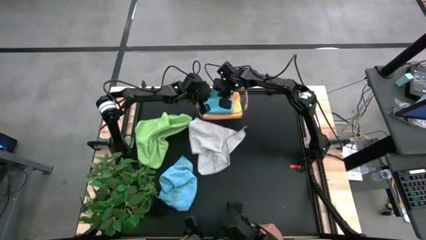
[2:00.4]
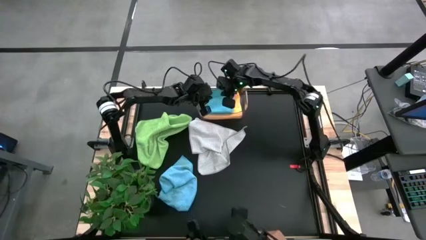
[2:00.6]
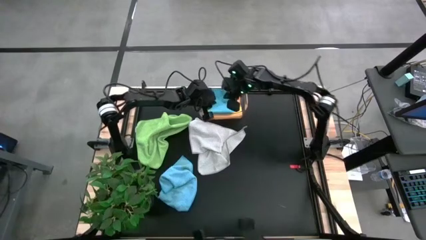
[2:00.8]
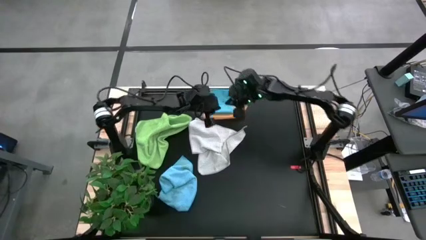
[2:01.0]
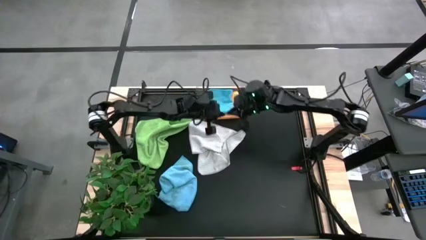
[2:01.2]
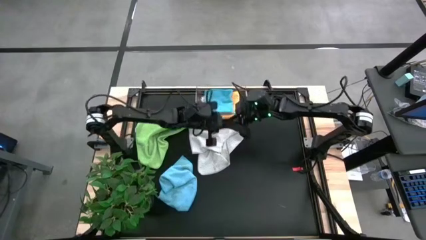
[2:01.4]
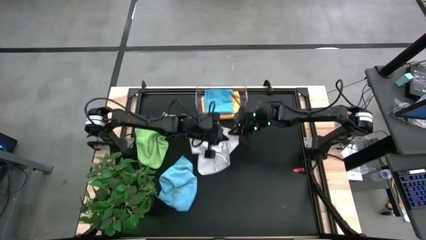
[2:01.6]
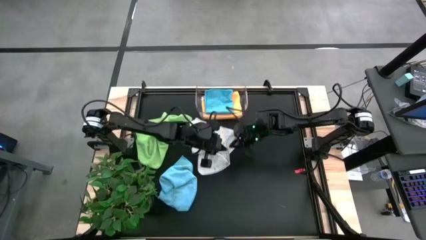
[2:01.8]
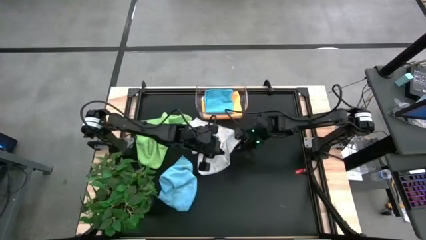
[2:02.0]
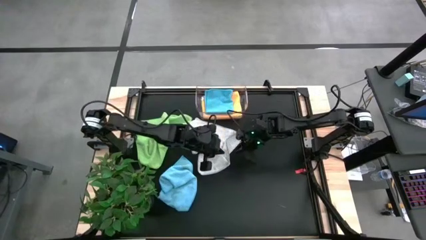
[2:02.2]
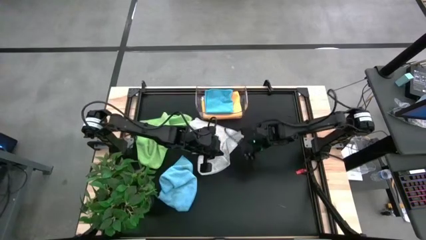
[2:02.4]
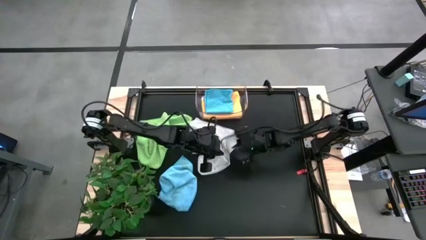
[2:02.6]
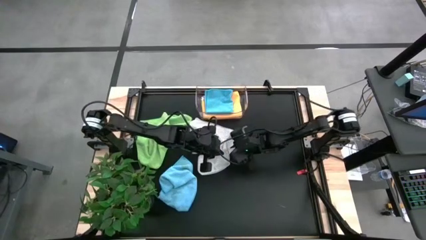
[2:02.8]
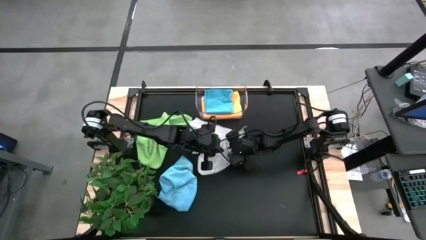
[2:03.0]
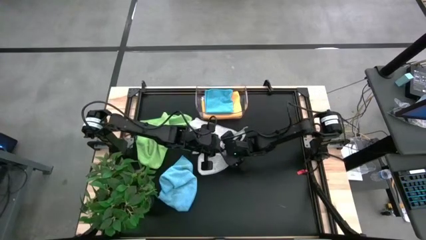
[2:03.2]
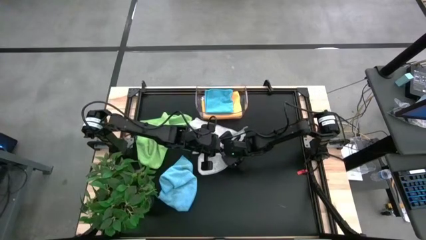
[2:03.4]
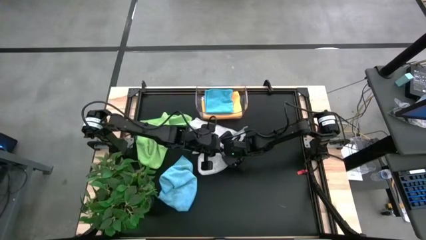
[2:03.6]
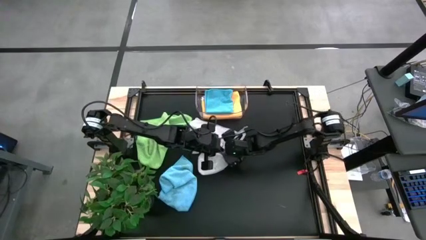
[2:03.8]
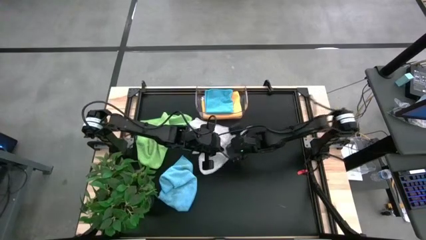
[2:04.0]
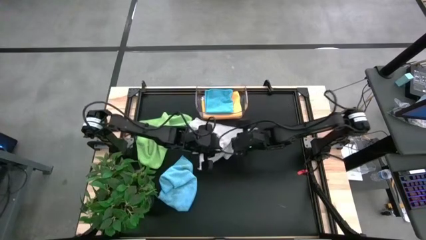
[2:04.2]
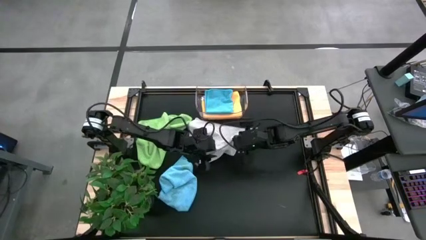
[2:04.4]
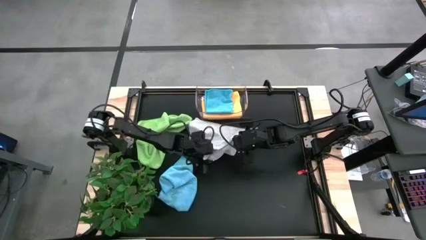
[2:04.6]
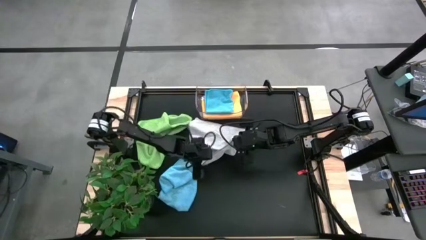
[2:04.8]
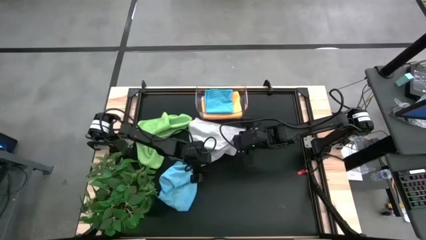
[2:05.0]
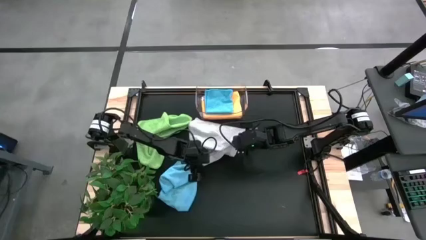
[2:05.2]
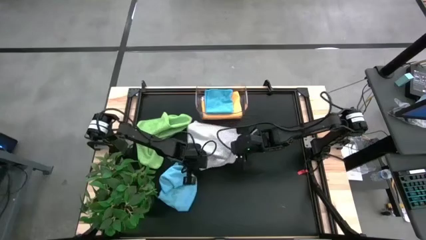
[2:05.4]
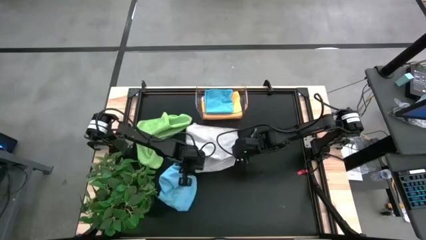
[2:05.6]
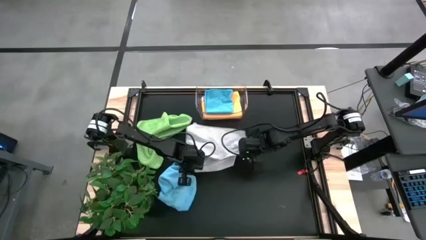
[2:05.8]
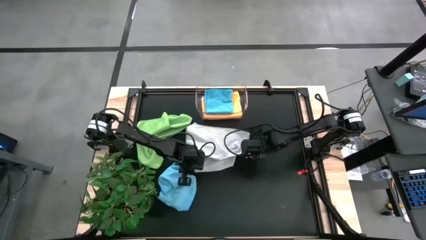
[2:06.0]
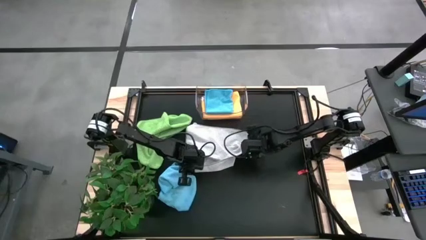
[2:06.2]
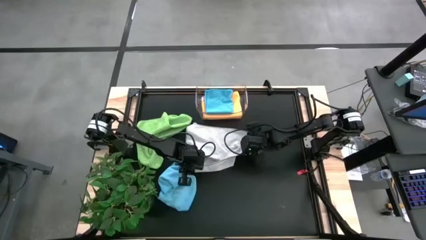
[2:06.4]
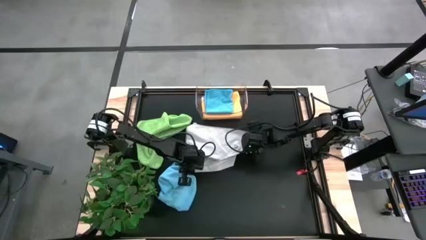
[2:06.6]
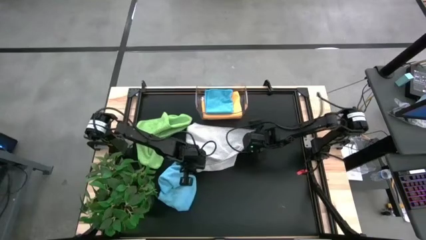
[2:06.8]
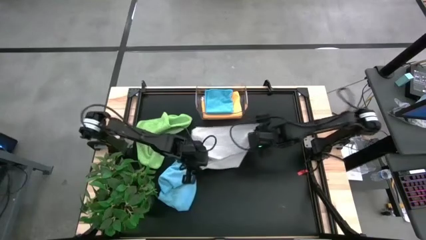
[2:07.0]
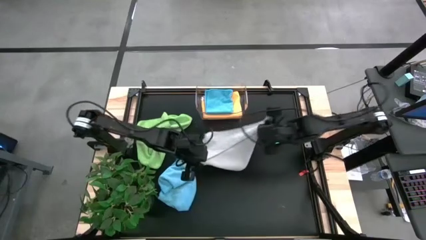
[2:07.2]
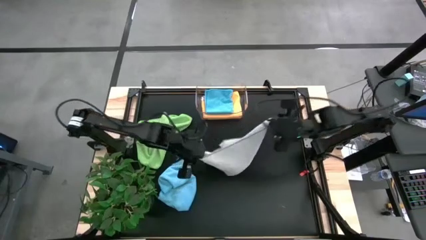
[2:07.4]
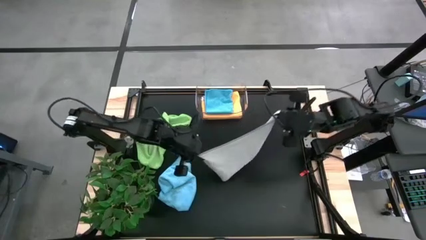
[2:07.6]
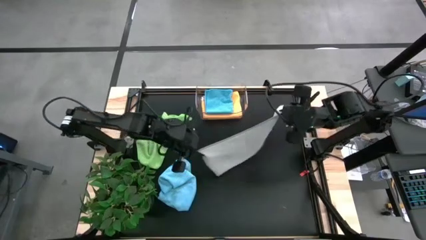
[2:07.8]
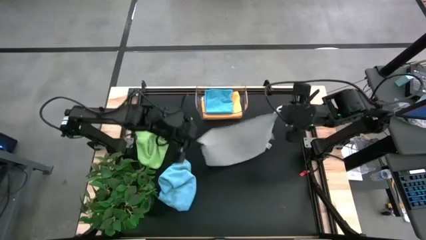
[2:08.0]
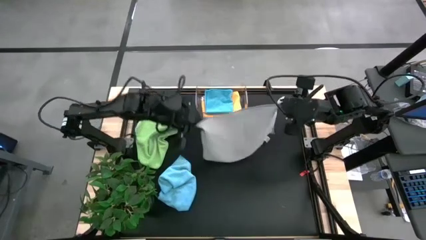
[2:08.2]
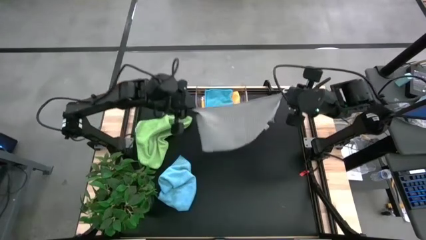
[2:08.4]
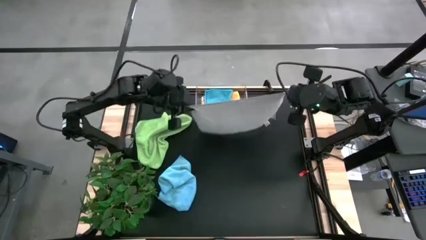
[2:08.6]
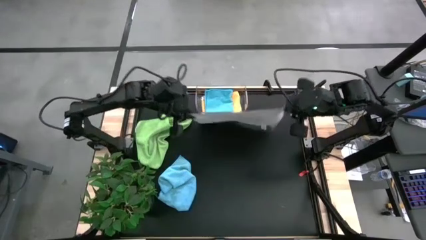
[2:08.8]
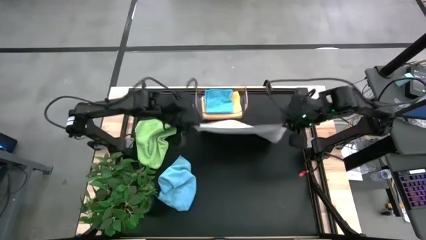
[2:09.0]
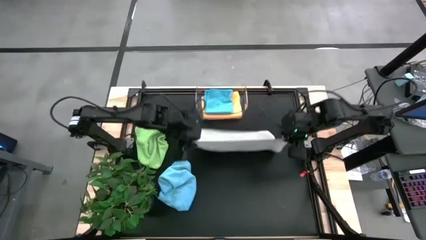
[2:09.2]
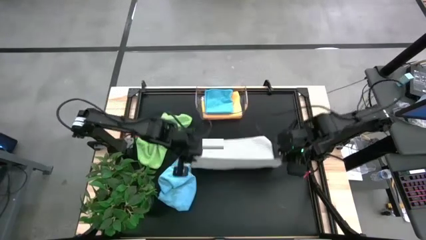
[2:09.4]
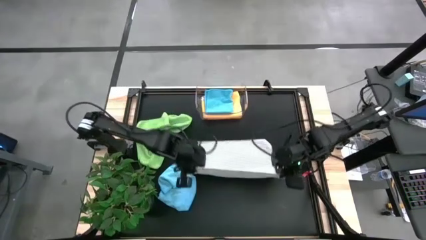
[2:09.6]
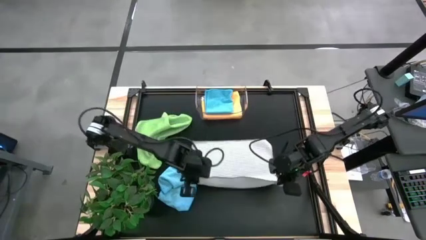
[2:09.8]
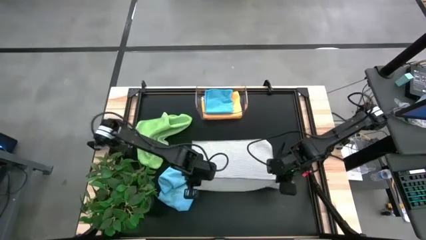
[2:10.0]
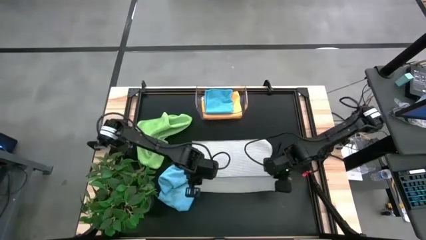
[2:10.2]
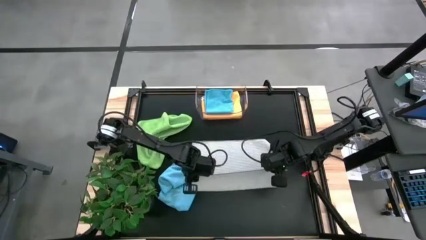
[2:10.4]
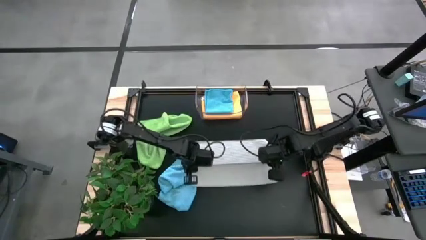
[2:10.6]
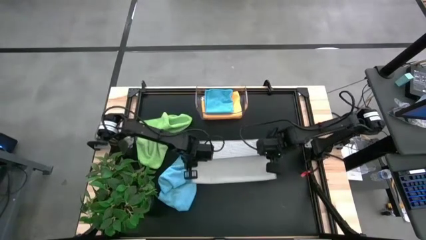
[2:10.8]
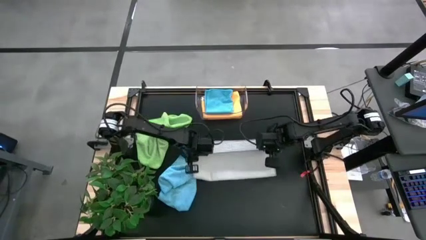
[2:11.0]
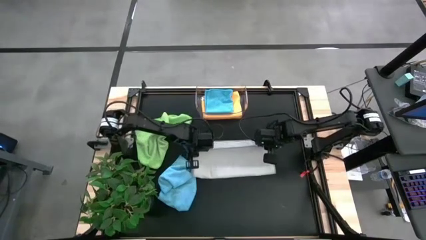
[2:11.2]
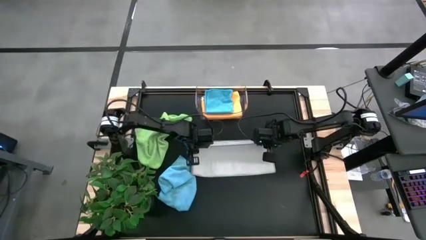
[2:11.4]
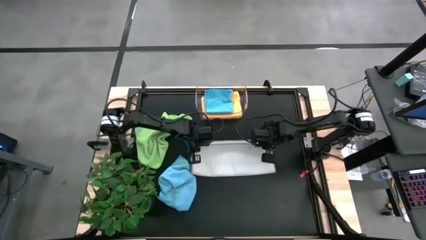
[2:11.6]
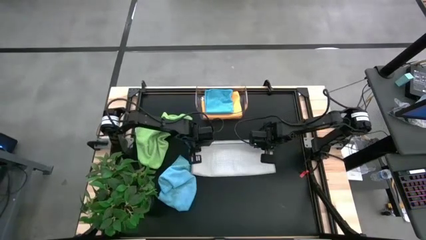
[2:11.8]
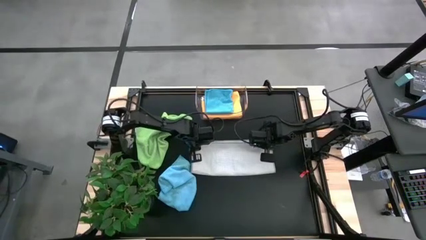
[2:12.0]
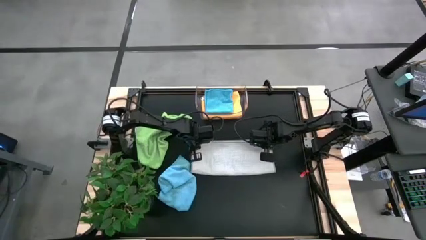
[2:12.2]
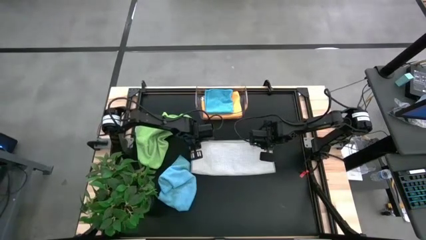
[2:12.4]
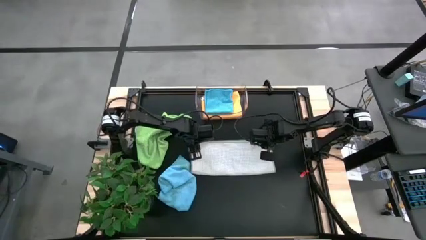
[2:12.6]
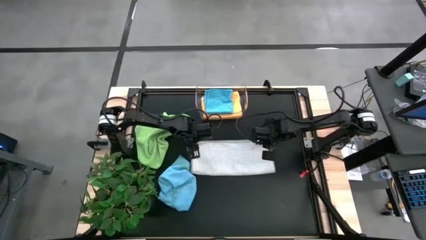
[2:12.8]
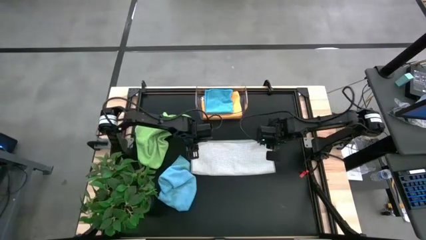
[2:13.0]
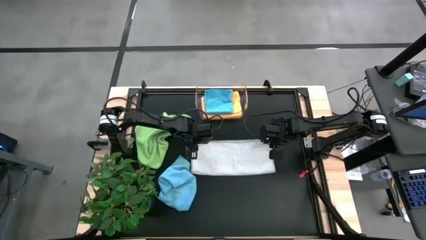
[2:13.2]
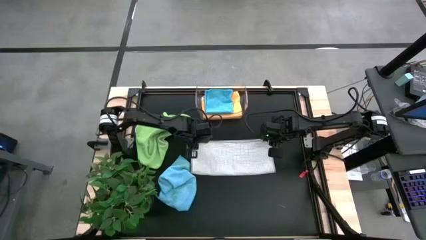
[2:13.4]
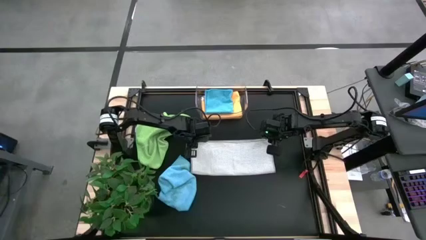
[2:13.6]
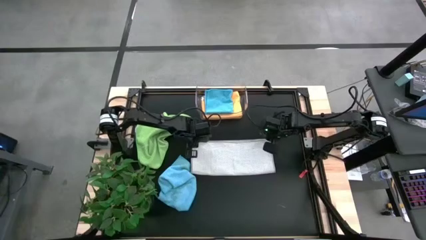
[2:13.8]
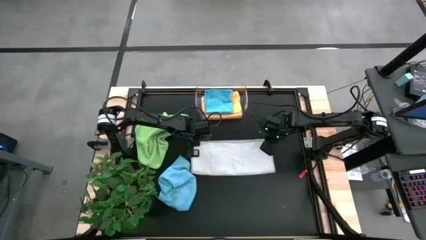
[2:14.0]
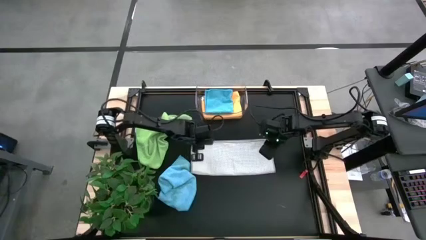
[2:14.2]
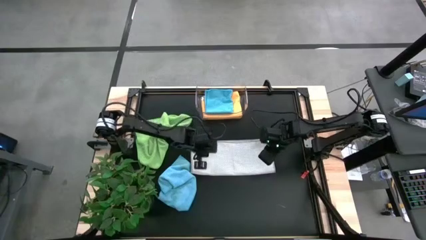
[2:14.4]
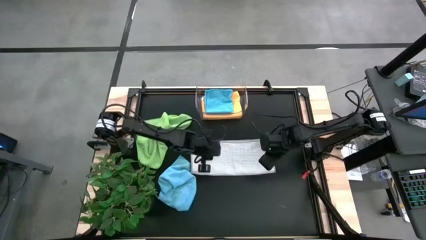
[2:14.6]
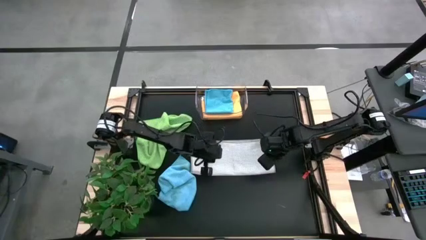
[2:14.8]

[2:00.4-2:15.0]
Task: Fold microfiber towels
Fold the gray microfiber cloth

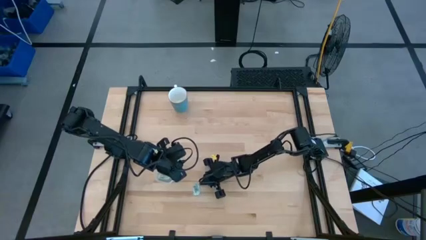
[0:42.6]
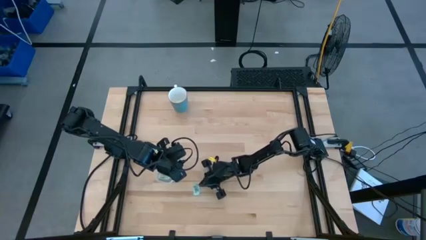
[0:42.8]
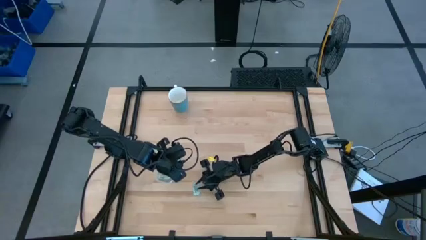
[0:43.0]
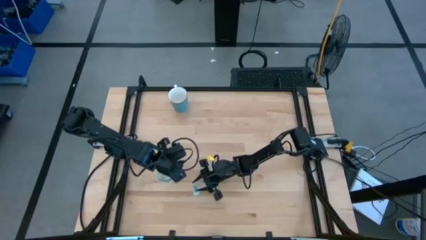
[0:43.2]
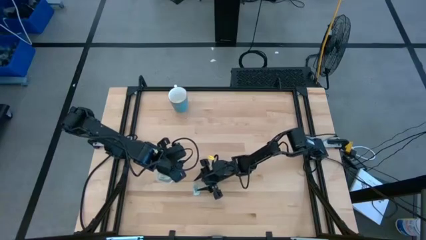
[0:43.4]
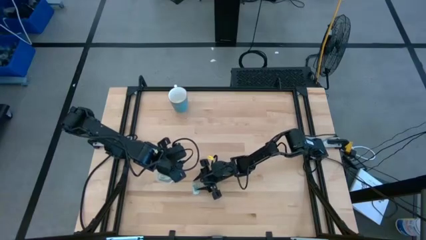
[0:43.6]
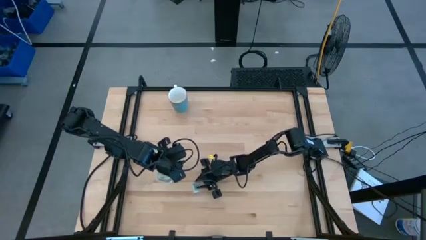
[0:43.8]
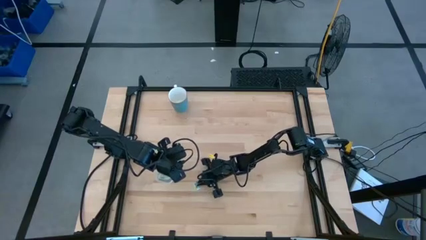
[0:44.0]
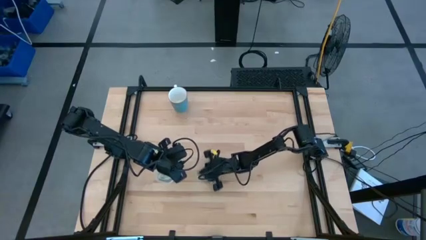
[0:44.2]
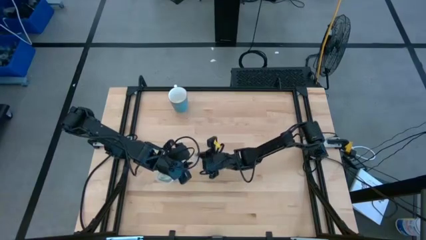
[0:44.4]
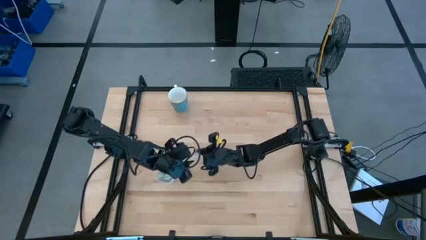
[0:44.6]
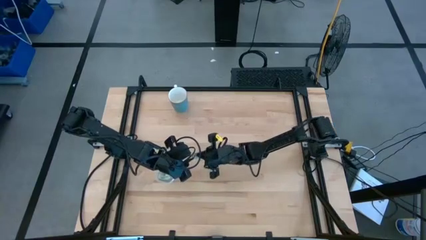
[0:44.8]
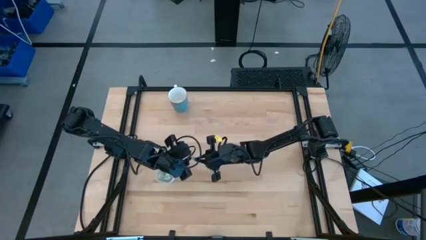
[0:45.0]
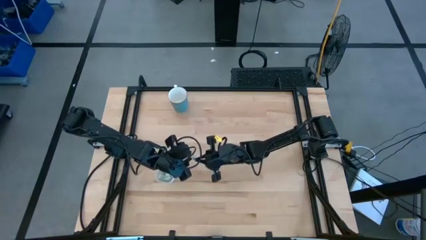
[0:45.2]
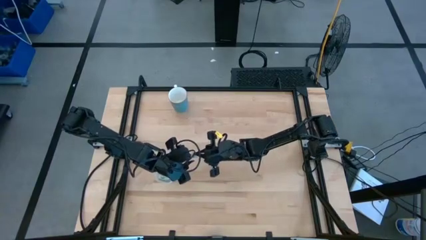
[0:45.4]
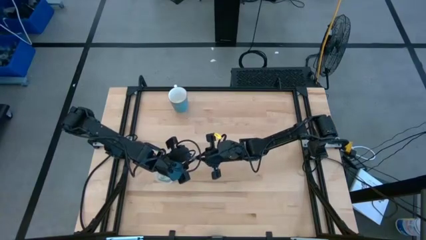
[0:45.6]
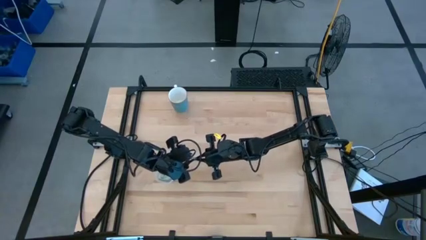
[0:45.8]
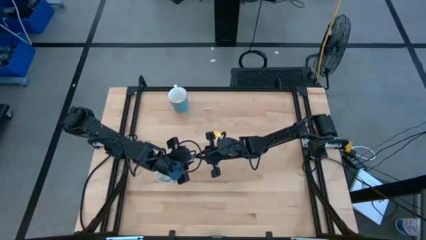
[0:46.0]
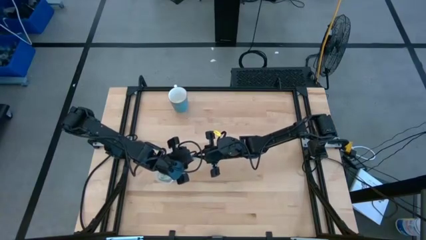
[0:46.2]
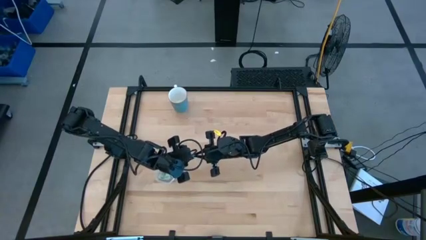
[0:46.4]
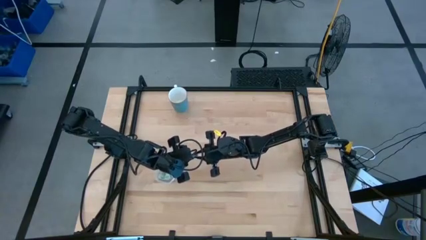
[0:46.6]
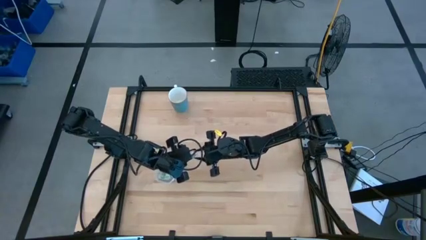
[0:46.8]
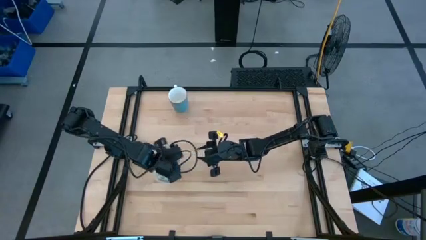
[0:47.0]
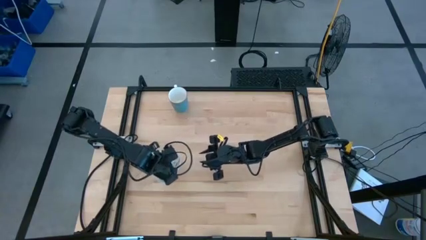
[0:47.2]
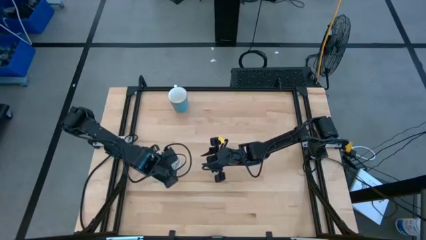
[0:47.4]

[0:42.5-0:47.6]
Task: Pick and place Stevia / Truvia into bins
Put the stevia packet into the transparent container
